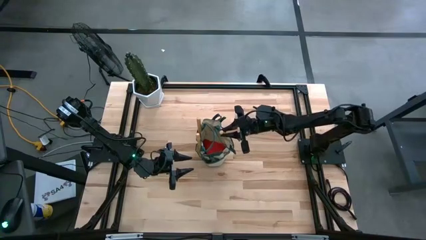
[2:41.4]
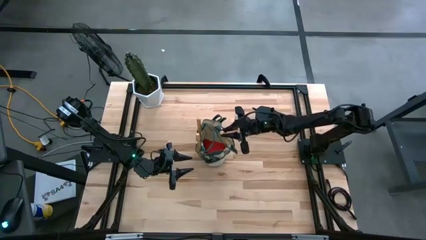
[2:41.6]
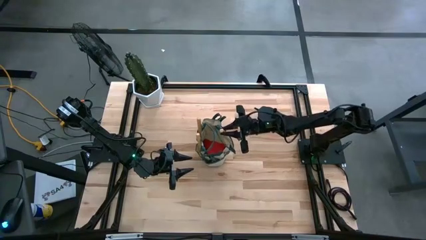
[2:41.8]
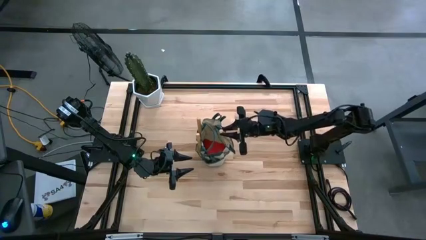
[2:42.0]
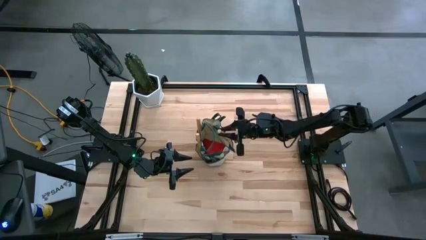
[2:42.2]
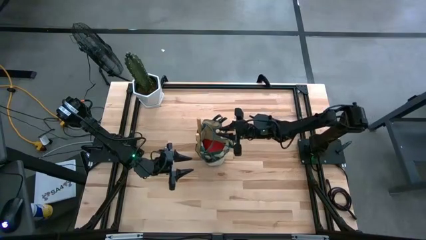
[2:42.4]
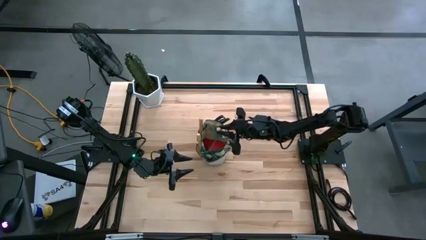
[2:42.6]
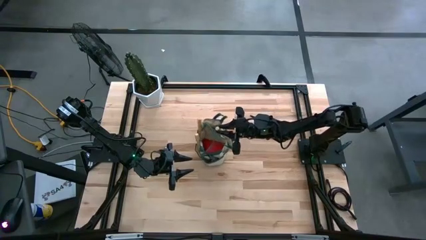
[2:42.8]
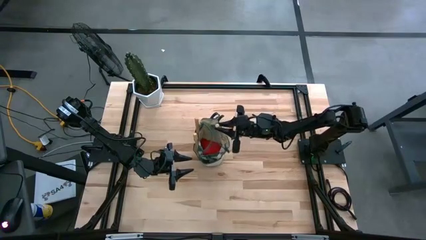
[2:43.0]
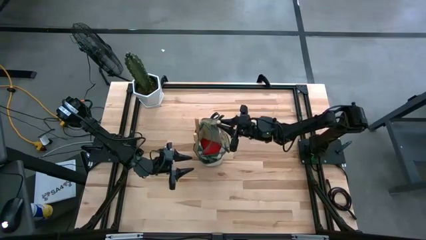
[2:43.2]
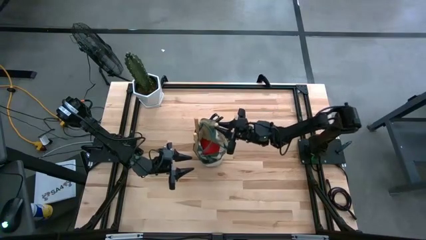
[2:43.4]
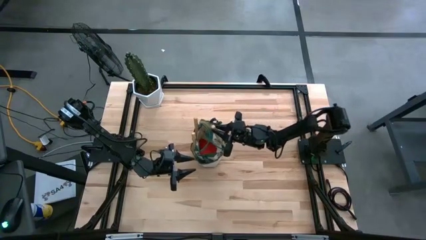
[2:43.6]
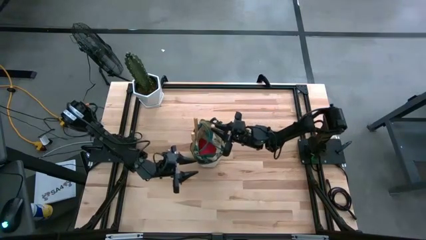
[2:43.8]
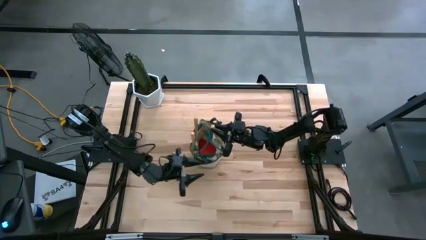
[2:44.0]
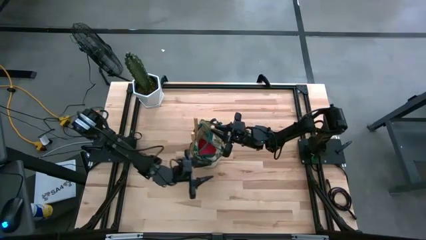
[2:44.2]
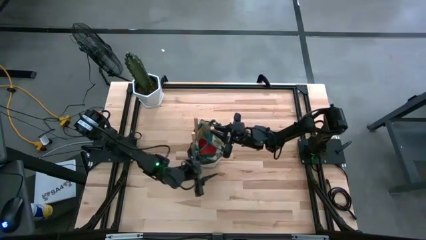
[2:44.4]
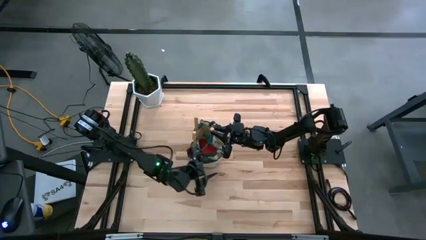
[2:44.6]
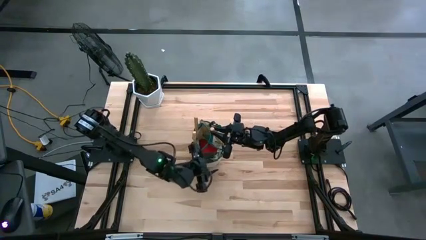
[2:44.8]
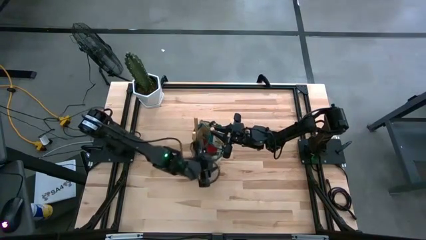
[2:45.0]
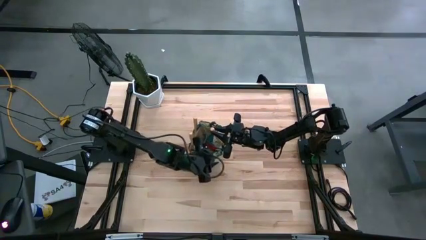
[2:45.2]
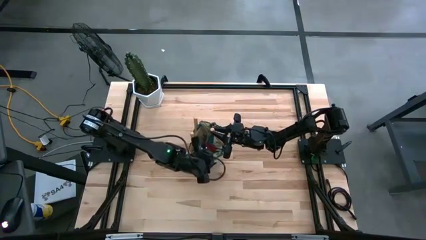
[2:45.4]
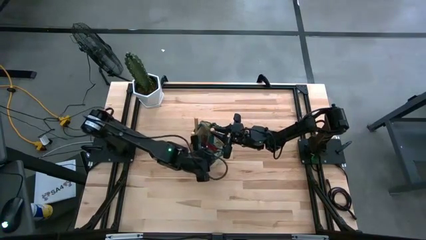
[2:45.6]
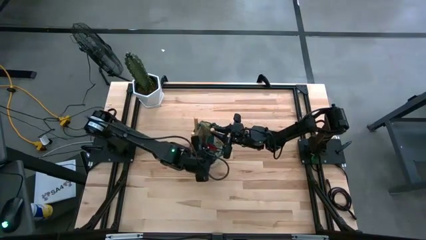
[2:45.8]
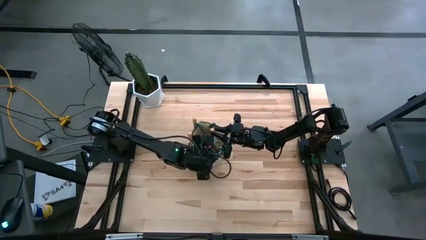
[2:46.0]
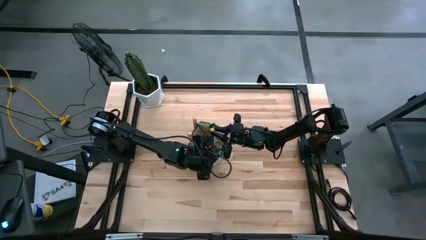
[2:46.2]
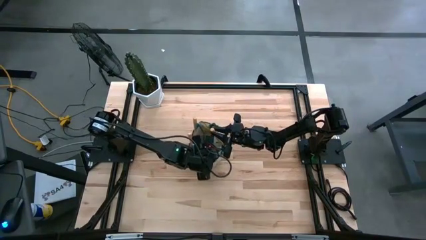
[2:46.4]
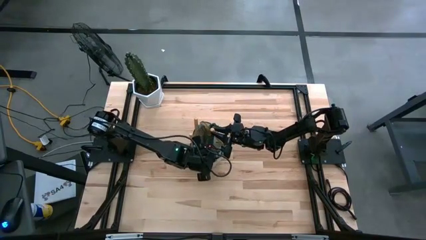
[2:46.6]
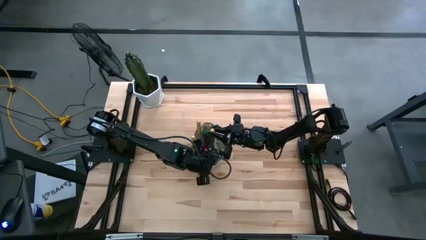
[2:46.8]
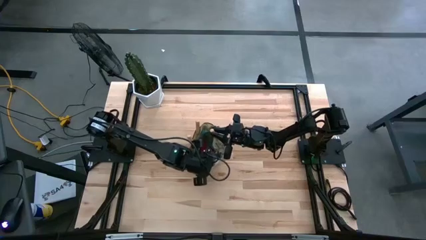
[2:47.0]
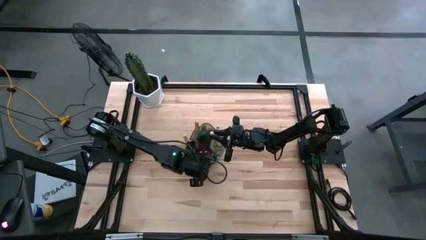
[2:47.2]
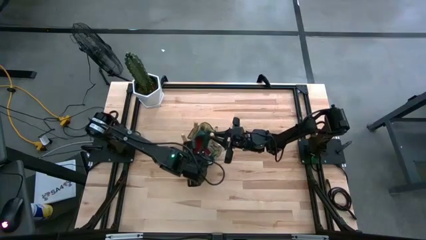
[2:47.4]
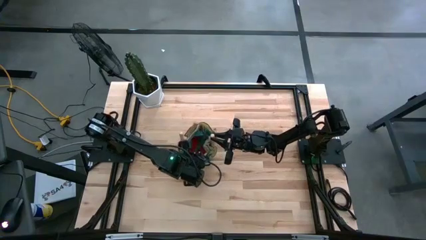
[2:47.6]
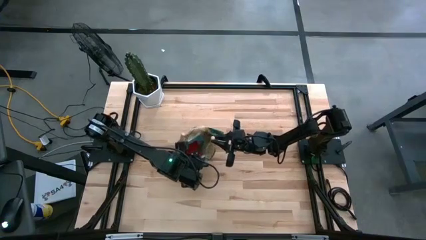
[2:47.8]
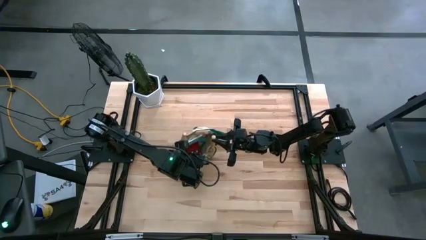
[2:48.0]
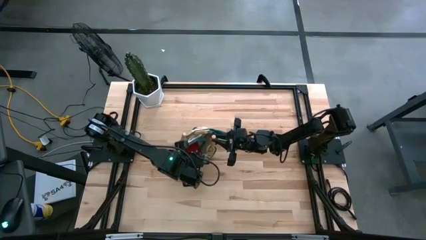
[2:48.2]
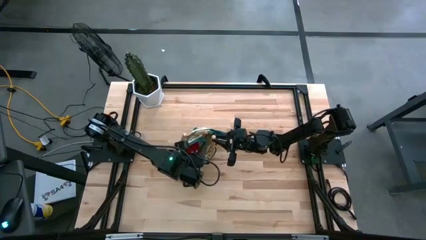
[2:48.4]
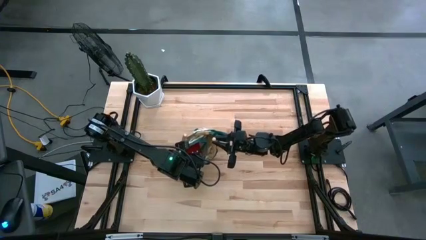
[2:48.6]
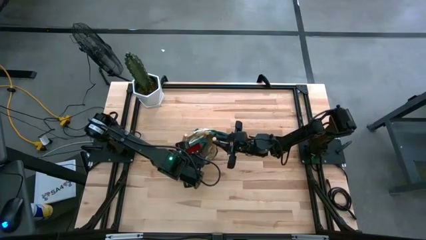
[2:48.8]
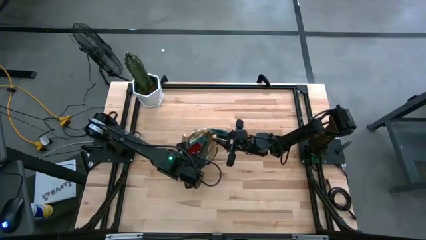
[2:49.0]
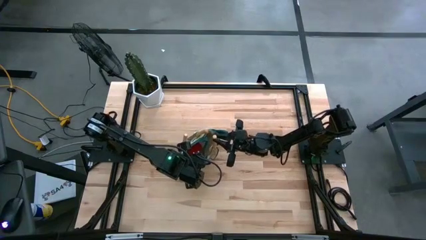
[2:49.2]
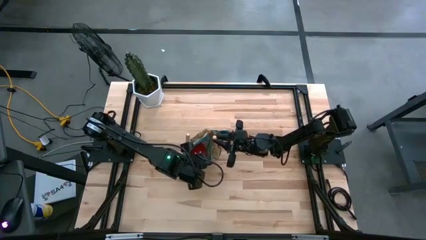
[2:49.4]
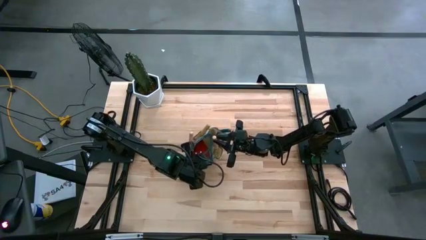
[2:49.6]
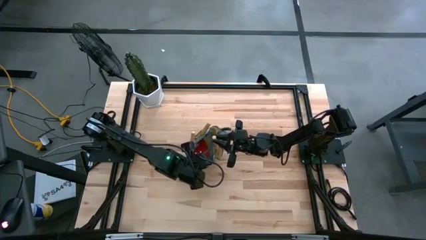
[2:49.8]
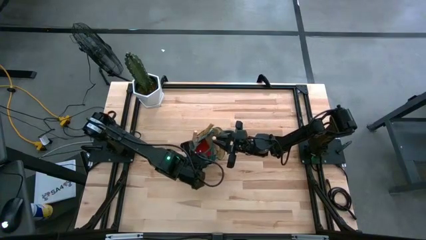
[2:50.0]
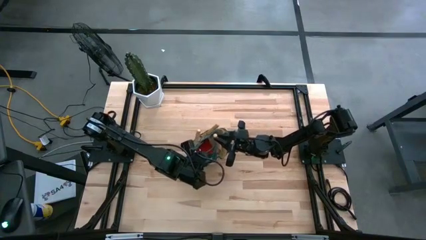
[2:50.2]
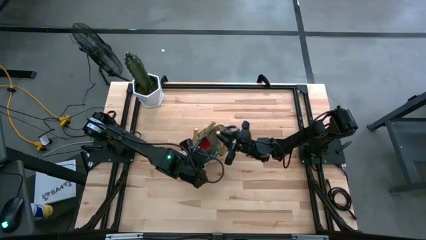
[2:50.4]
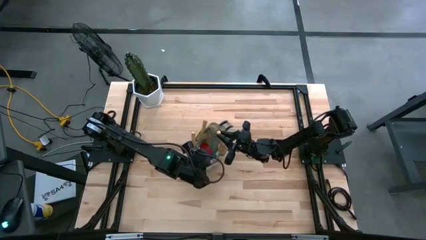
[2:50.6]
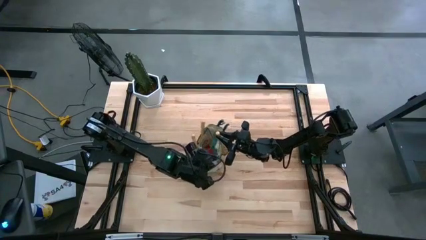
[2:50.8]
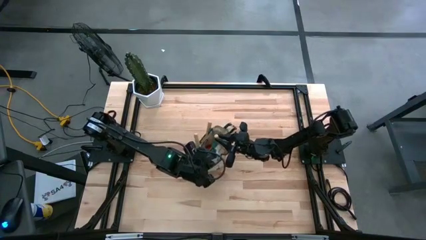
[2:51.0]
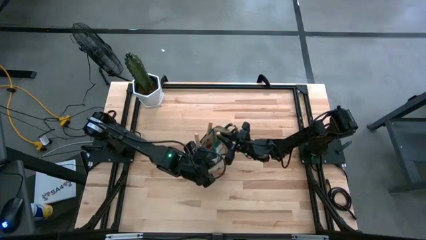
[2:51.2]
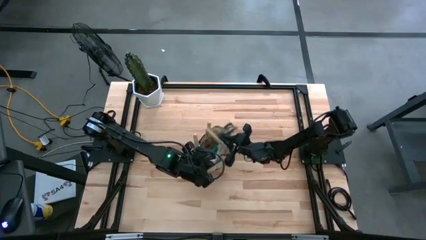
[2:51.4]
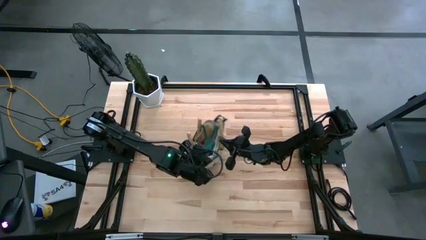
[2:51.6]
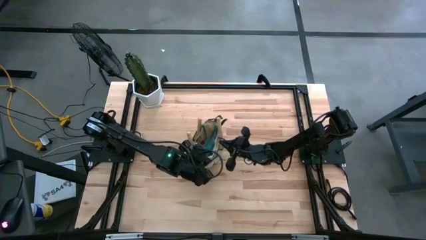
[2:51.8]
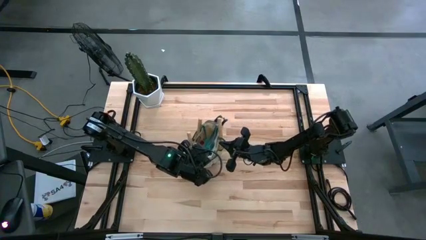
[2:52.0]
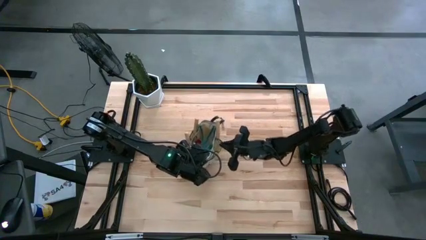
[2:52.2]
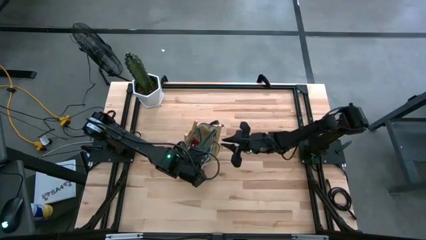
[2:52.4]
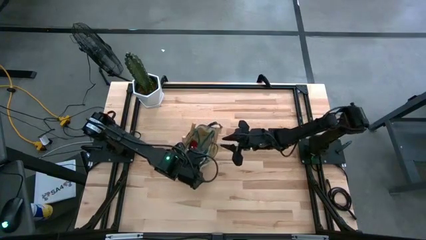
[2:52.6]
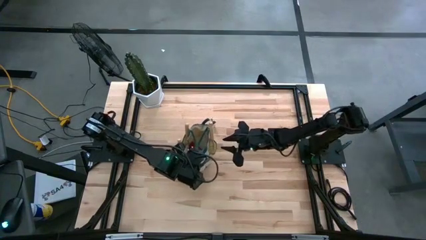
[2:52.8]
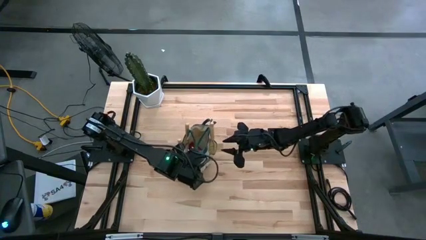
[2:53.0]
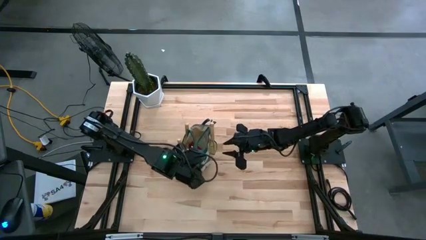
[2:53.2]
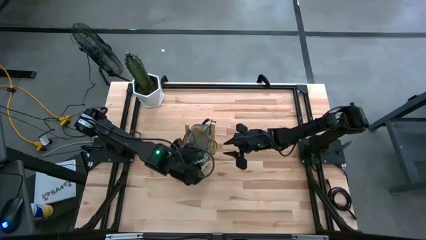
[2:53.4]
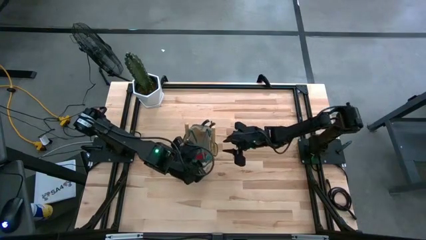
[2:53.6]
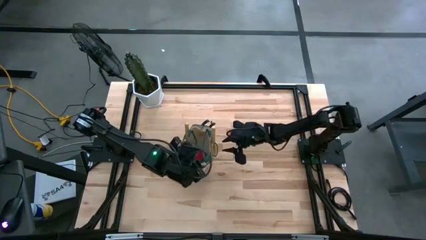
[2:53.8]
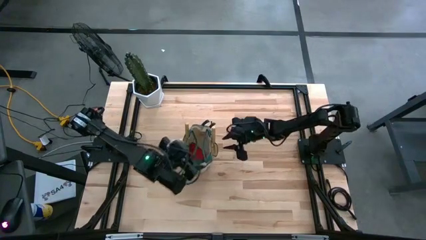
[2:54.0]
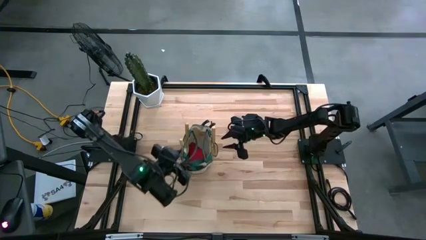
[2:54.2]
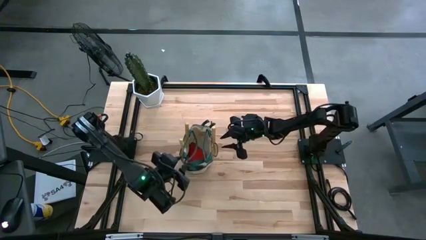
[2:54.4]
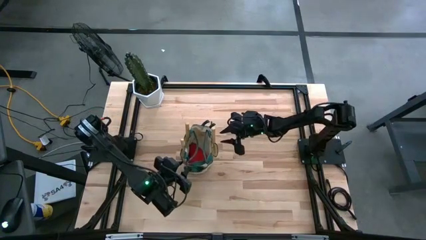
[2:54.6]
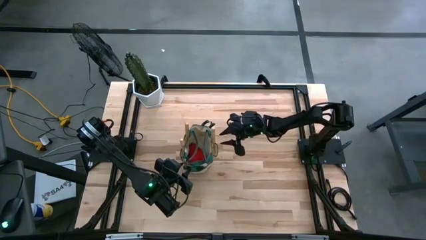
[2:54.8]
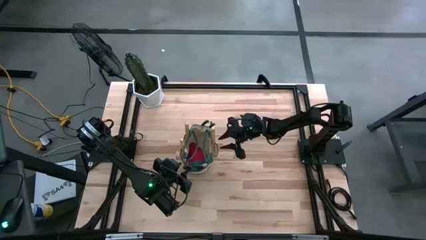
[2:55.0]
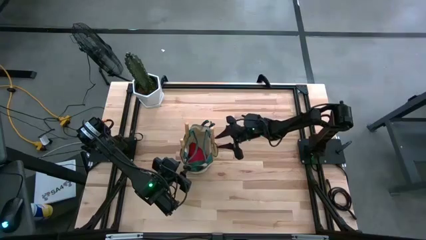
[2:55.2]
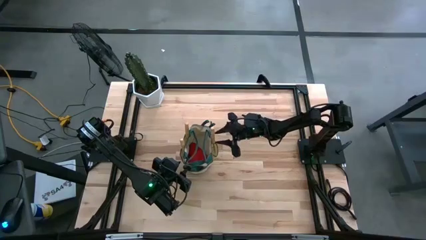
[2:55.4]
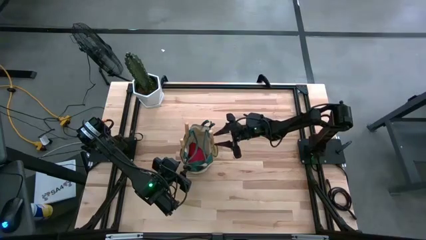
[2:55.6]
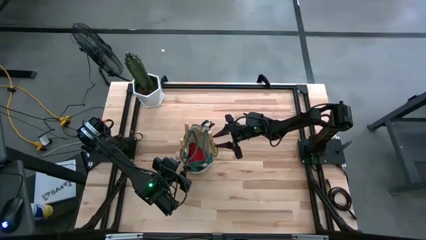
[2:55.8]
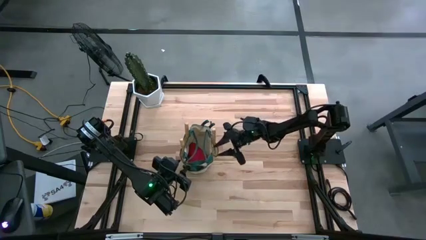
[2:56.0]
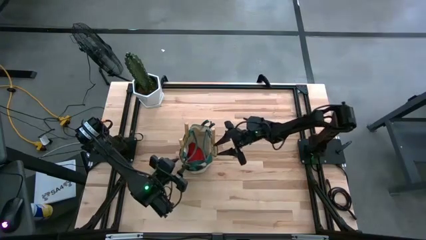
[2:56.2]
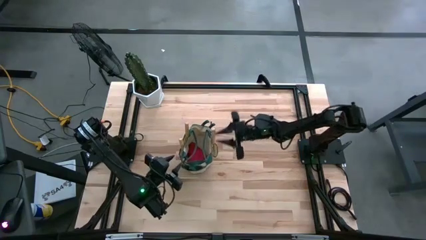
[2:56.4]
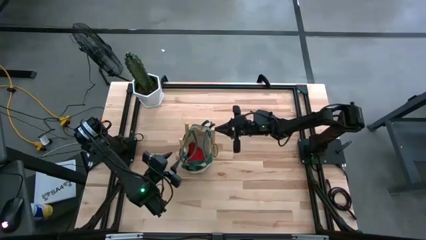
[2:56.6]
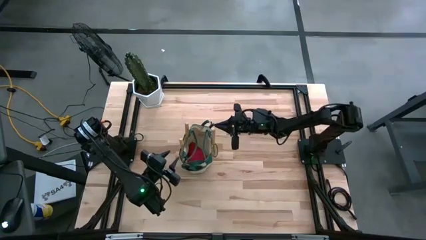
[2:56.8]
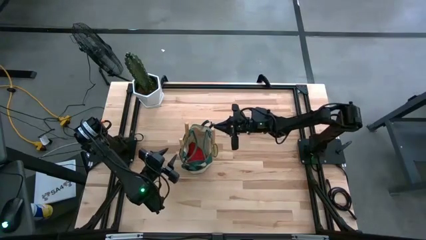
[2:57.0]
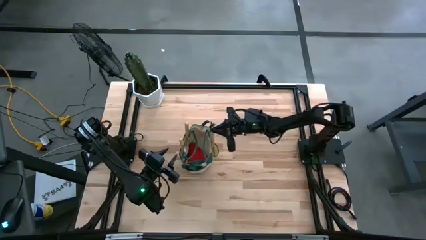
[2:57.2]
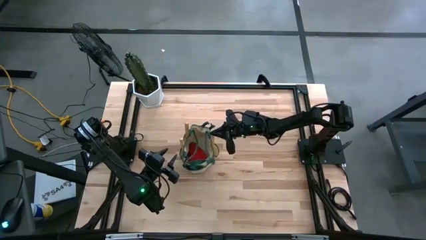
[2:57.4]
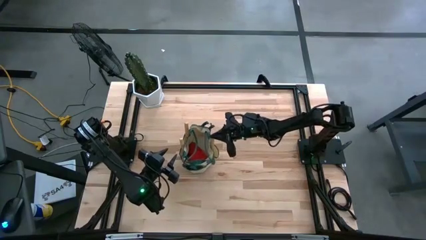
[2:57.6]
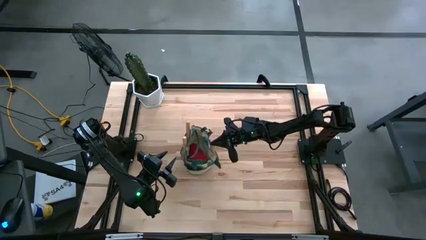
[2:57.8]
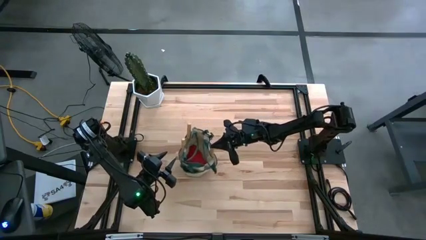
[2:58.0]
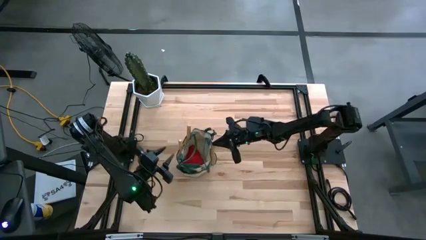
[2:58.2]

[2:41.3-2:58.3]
Task: Pick & Place Garden tools in Gardening bag
Put the brown hand rake into the gardening bag
